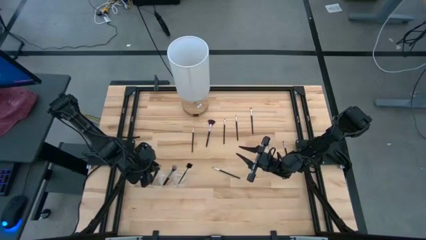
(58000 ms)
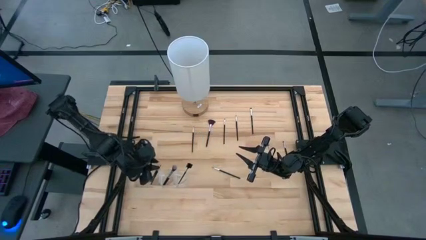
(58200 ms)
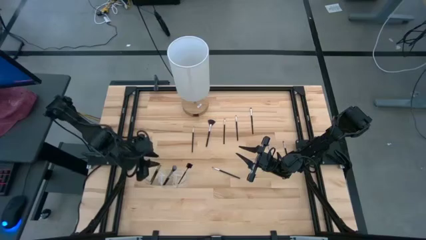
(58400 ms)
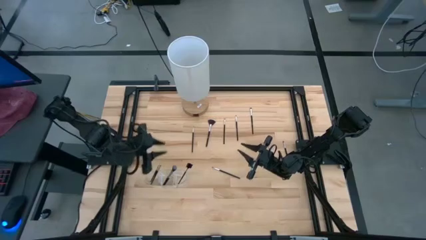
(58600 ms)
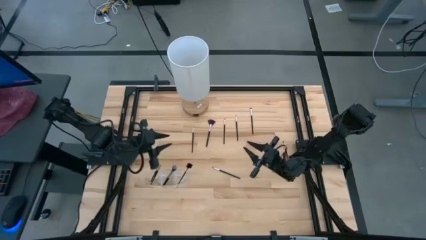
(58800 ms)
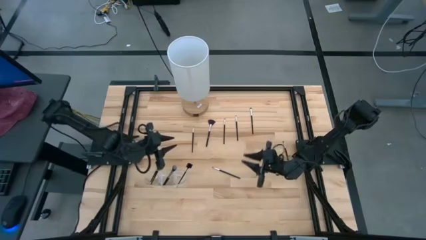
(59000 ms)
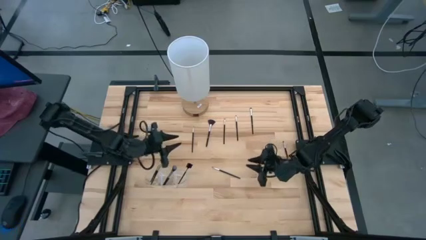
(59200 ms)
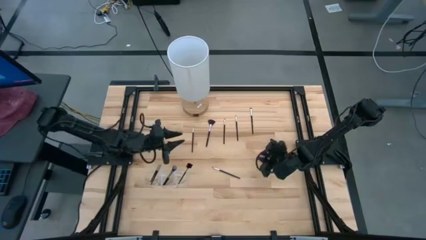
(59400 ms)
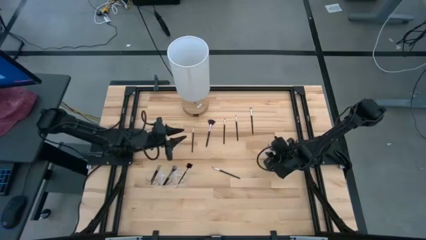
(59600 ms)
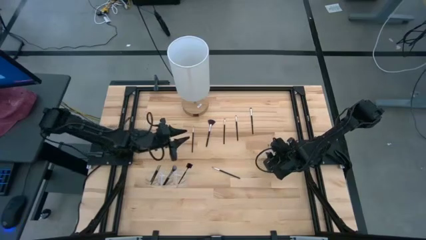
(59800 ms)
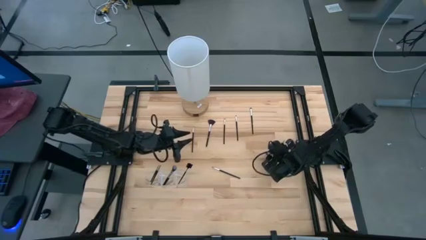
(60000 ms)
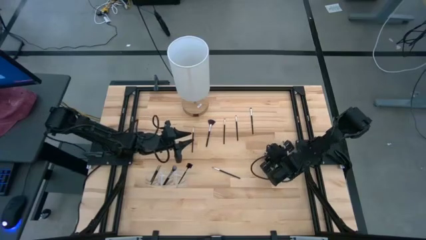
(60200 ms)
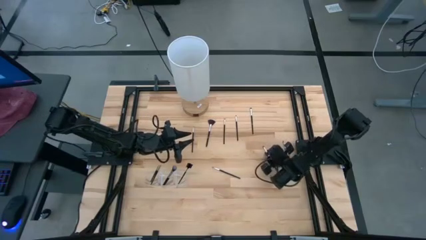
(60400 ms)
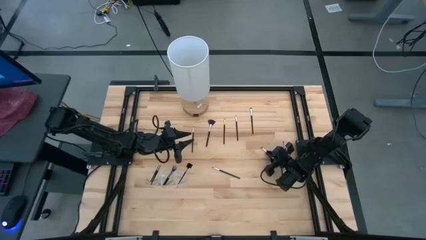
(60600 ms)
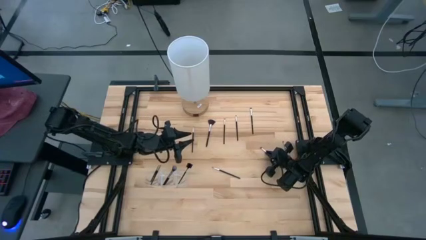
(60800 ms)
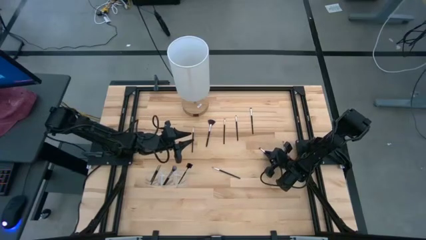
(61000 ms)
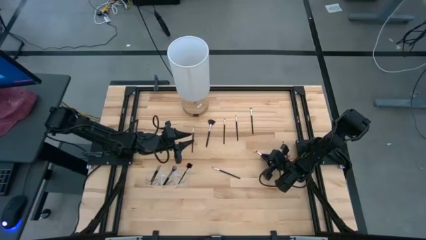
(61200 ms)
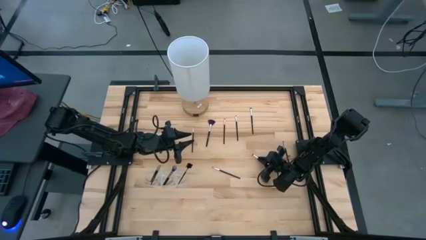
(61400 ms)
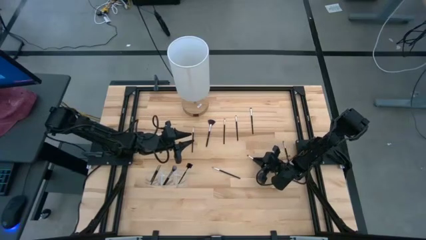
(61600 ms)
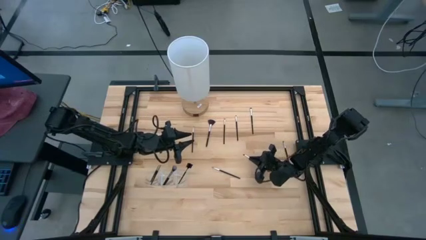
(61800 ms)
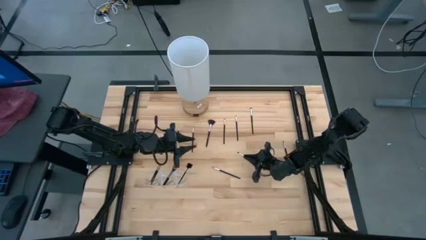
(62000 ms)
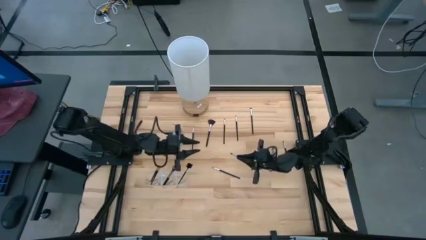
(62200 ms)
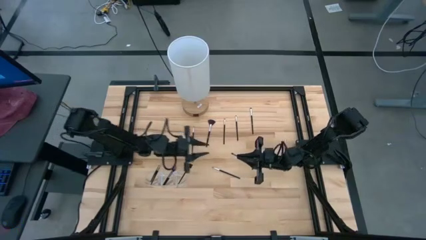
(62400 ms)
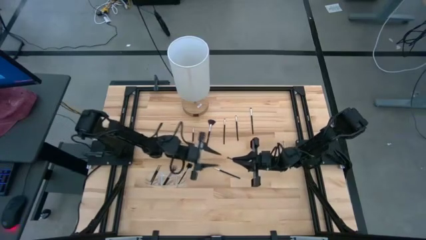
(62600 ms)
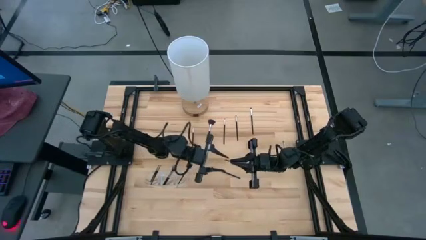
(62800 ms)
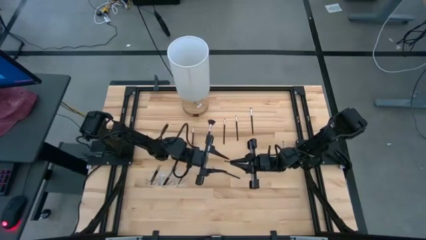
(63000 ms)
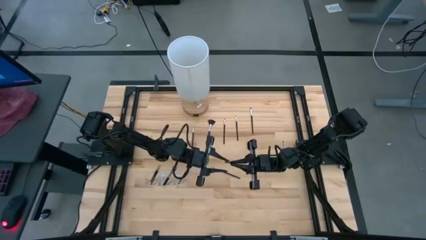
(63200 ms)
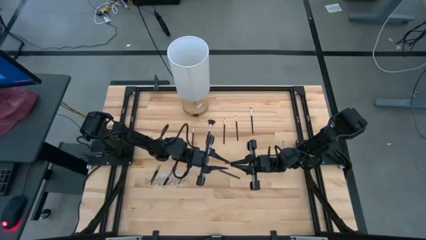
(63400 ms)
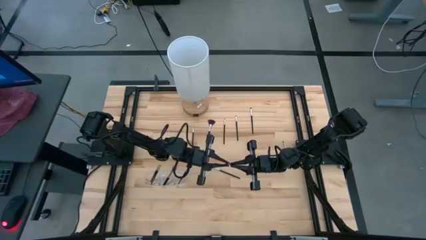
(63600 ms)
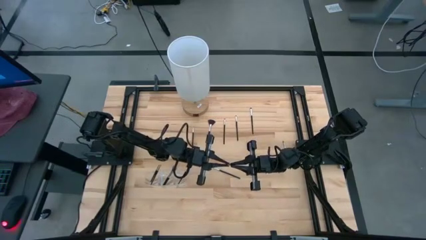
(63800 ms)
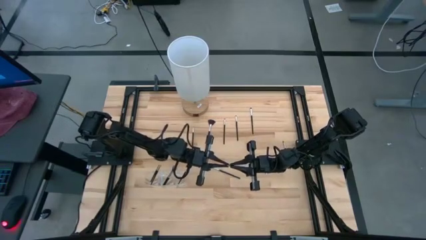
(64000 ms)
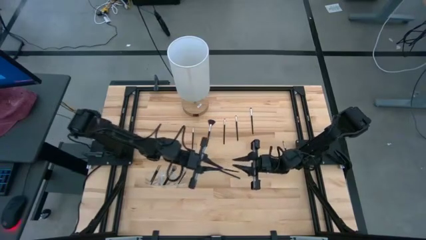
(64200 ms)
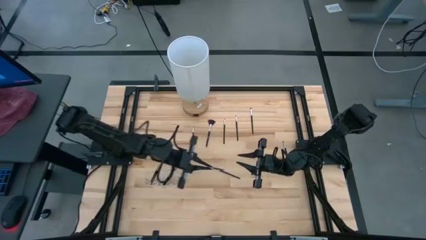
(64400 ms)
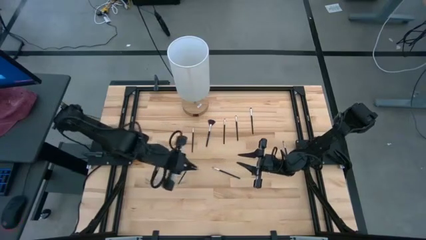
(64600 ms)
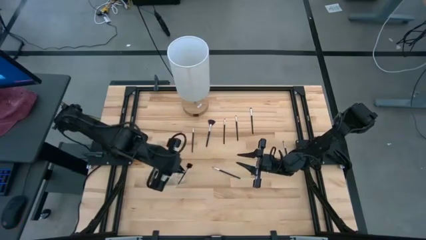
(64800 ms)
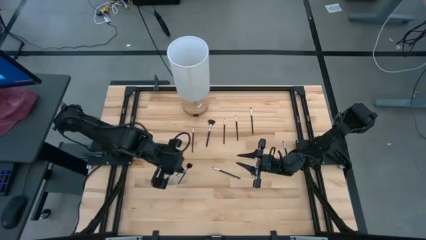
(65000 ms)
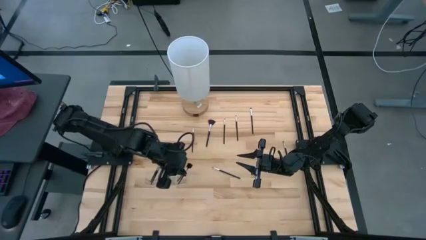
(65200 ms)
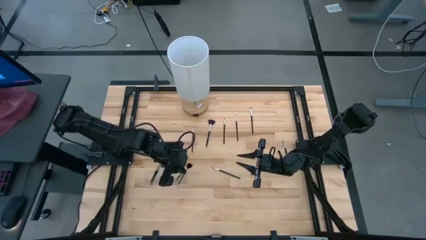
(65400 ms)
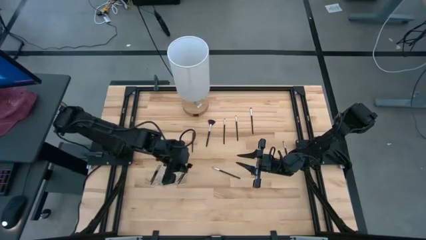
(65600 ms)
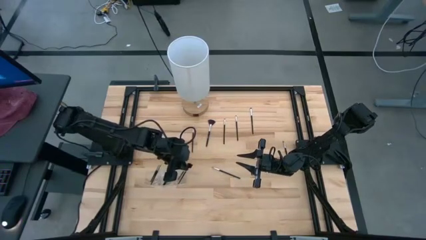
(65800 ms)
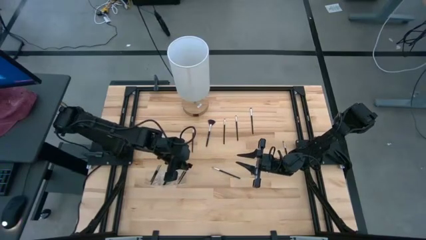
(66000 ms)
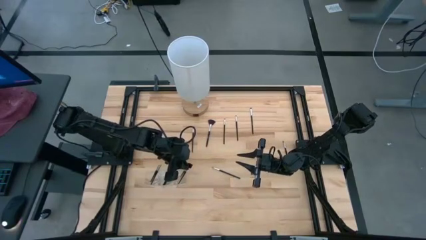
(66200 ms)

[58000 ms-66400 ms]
Task: Put items in baskets/containers
Put the foundation brush in the transparent organizer

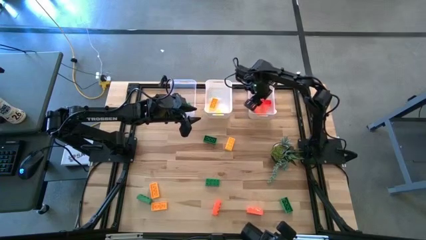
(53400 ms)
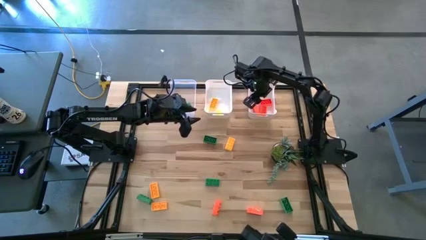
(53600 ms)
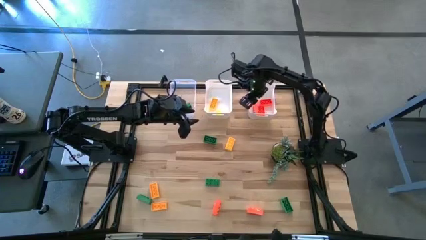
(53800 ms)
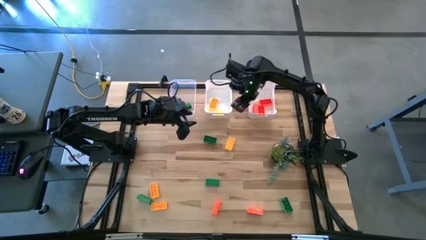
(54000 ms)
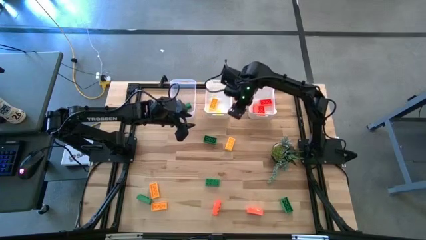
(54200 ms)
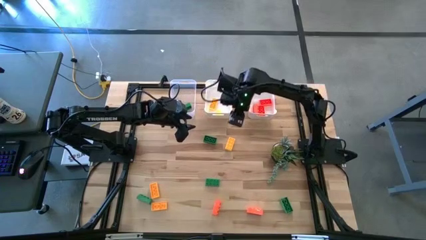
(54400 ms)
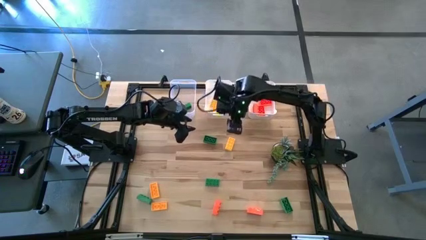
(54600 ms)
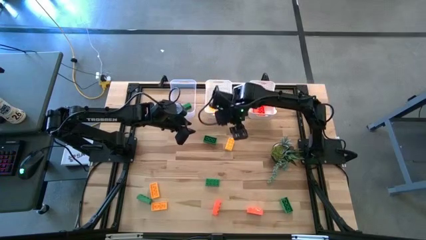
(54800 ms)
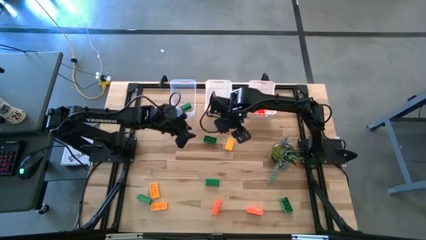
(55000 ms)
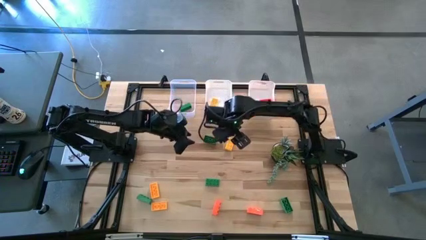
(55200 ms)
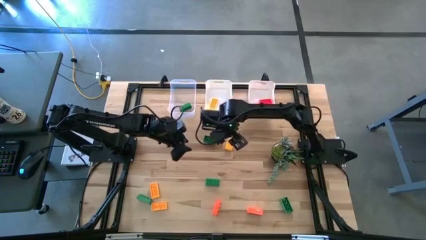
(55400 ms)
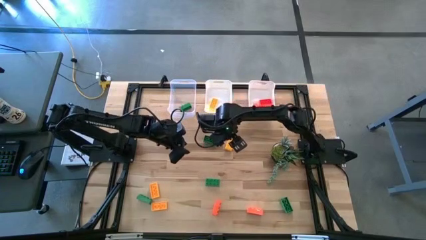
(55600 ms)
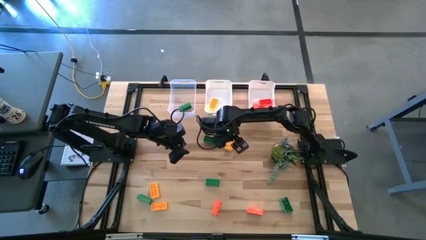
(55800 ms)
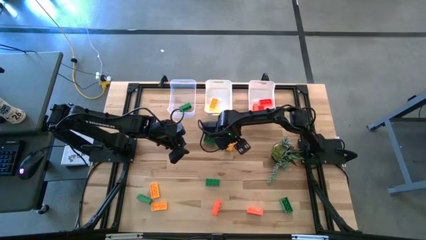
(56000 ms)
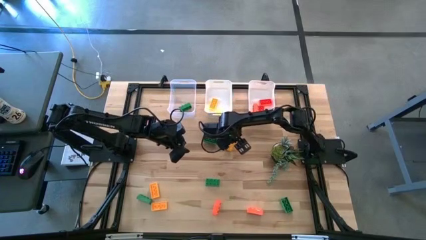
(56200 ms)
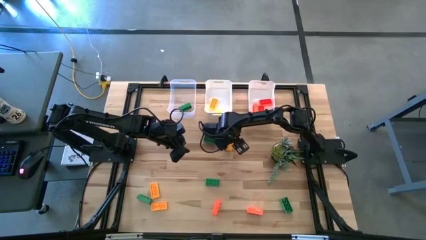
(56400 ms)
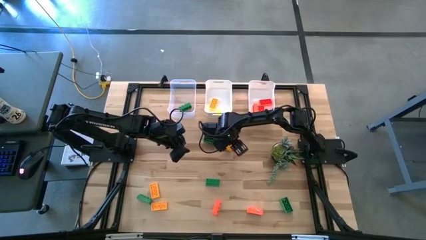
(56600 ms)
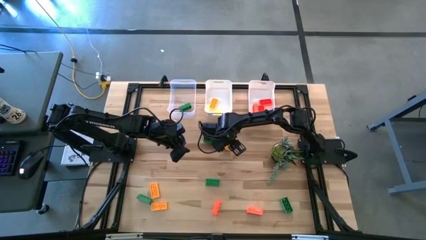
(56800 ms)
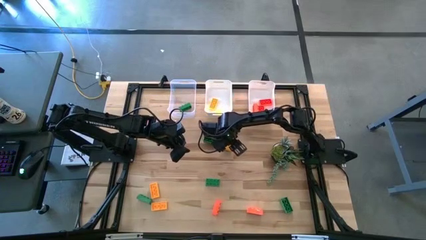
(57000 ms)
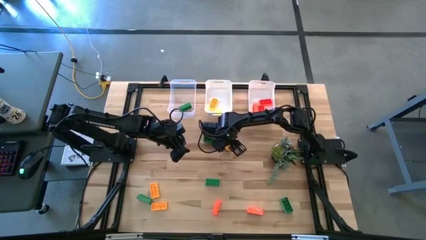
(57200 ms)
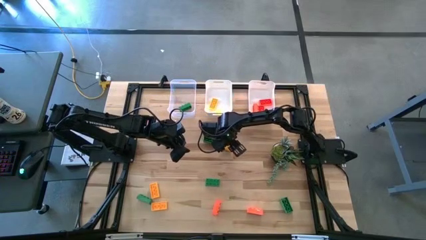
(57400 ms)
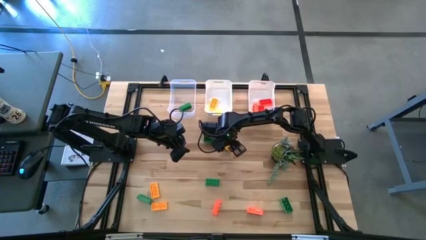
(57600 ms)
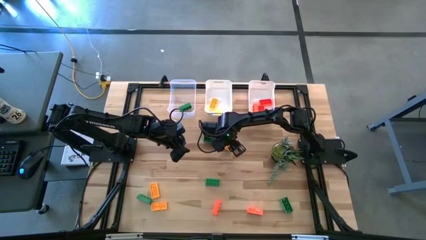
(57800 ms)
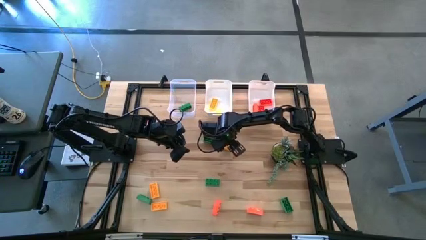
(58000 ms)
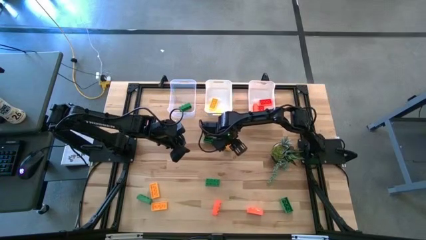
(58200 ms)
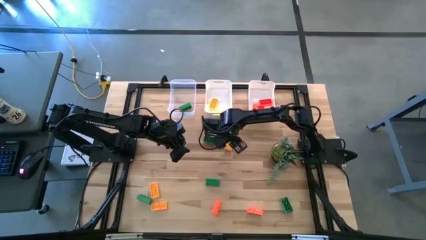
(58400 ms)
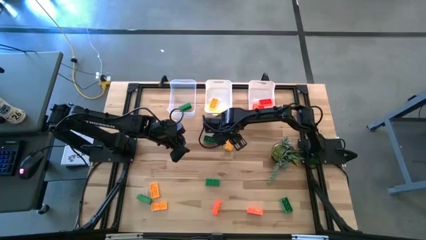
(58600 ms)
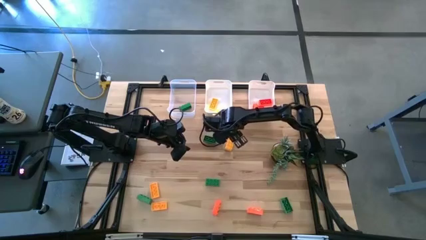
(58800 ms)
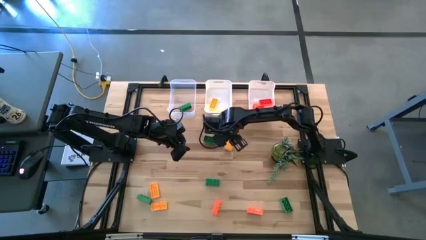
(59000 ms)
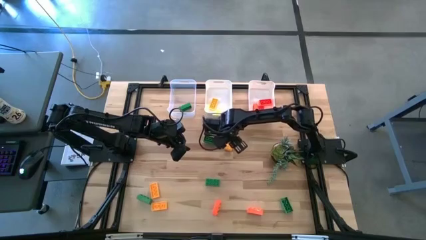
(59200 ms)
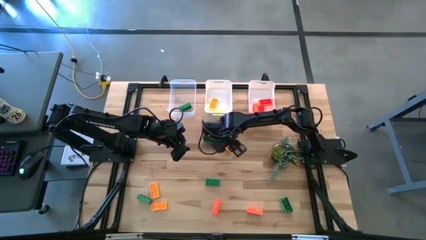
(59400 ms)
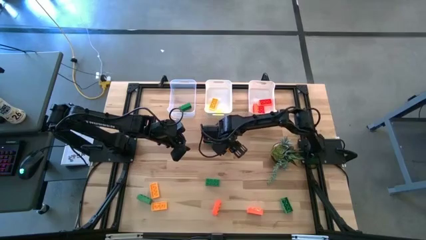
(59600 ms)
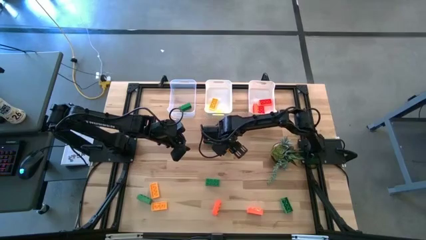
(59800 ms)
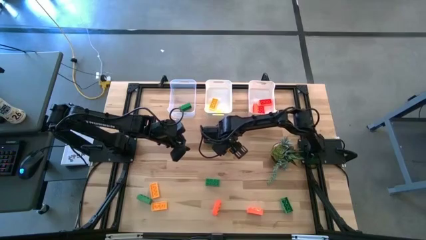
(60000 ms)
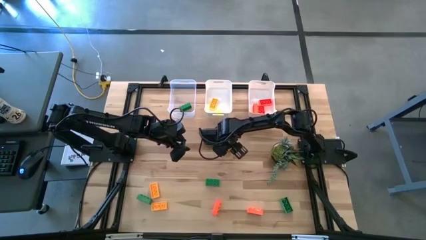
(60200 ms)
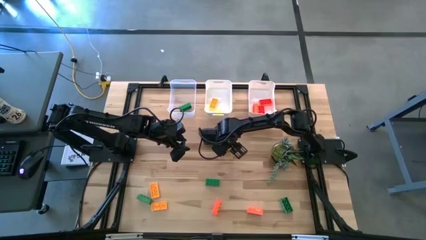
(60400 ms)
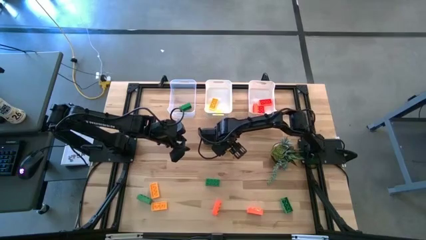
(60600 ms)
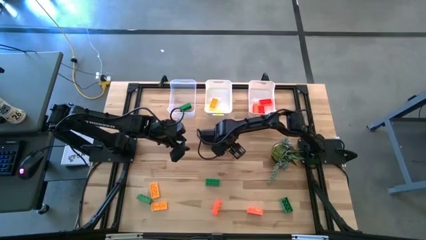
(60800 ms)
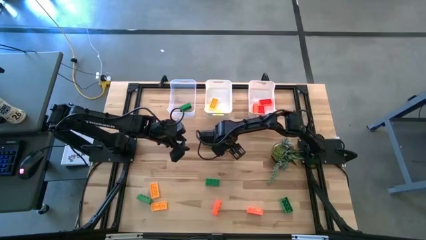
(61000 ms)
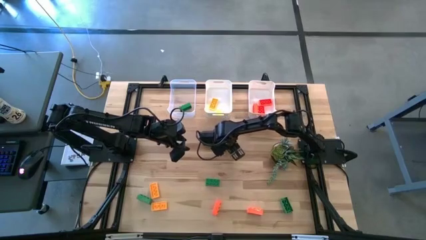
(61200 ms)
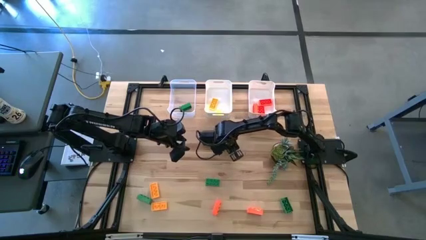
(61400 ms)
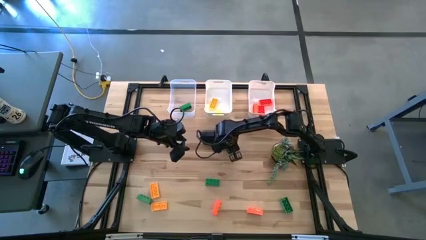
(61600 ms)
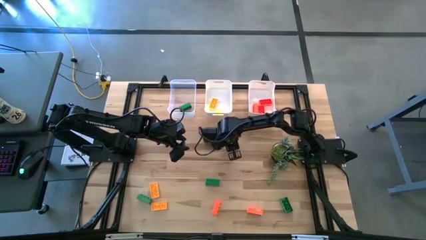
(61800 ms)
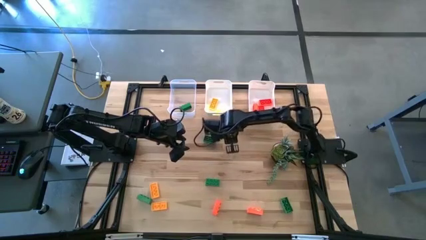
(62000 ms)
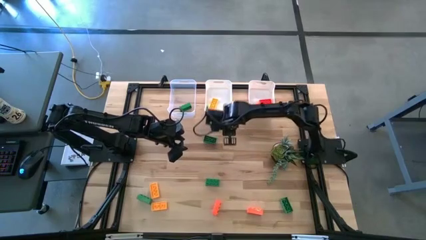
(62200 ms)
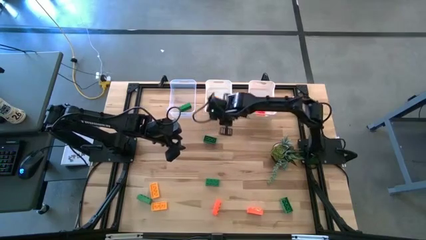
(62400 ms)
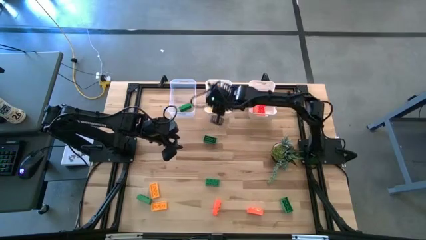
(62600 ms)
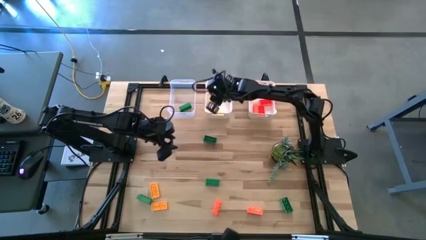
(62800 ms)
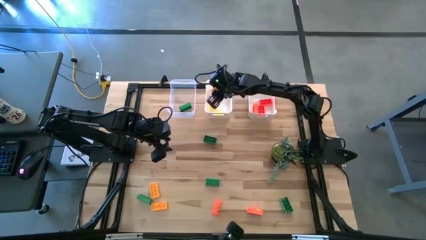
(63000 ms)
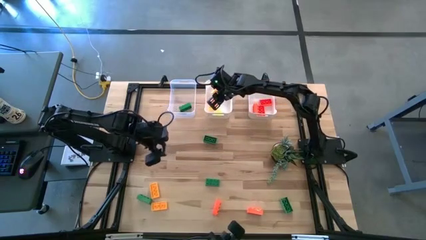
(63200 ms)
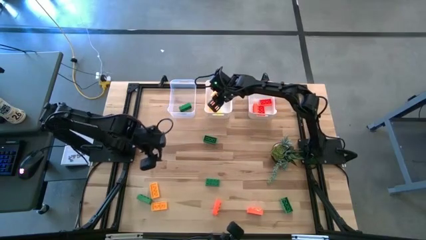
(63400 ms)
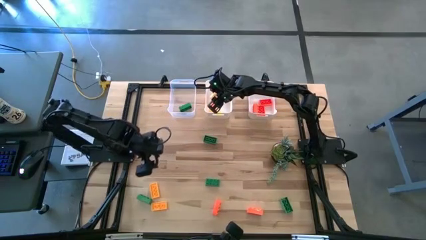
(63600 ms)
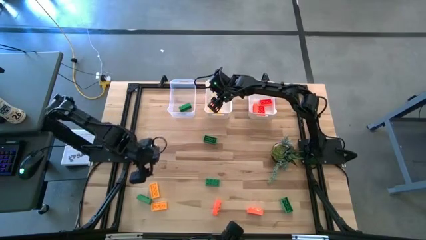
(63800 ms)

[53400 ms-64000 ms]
Task: Sort & place blocks by color
Put the yellow game piece into the left white bin
